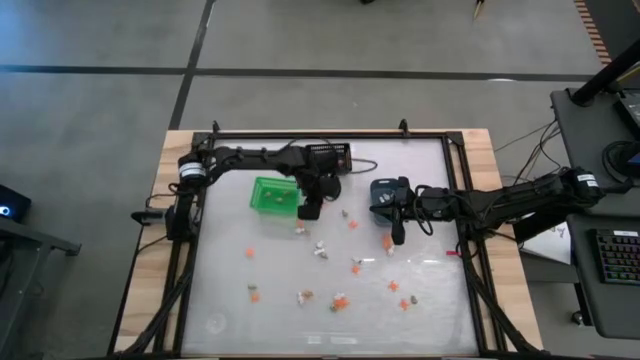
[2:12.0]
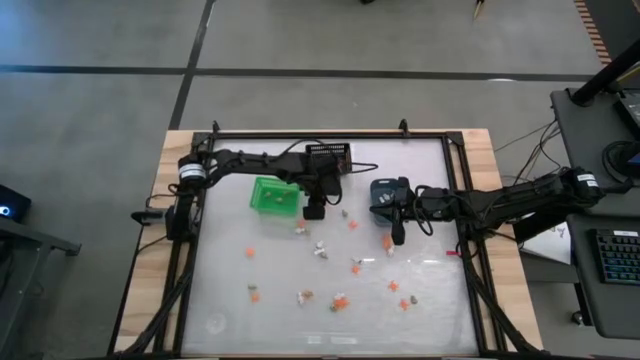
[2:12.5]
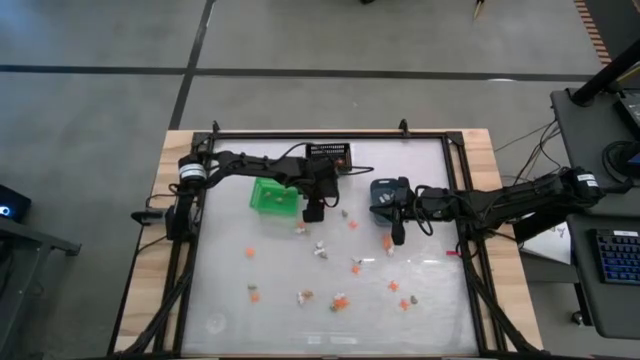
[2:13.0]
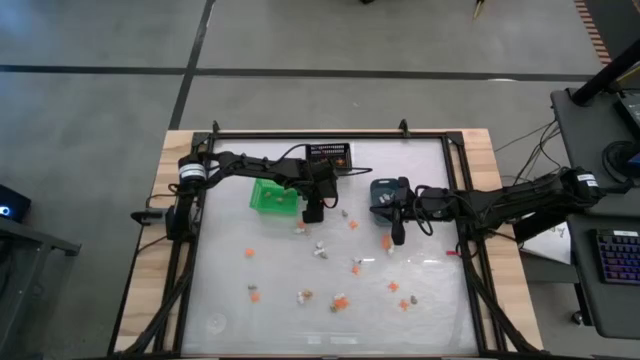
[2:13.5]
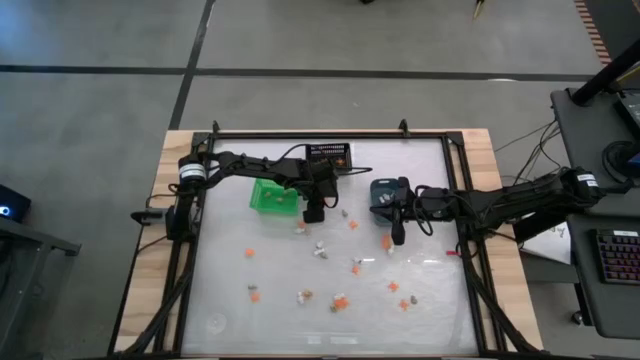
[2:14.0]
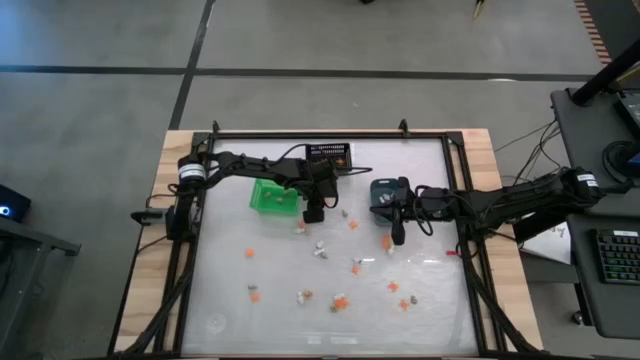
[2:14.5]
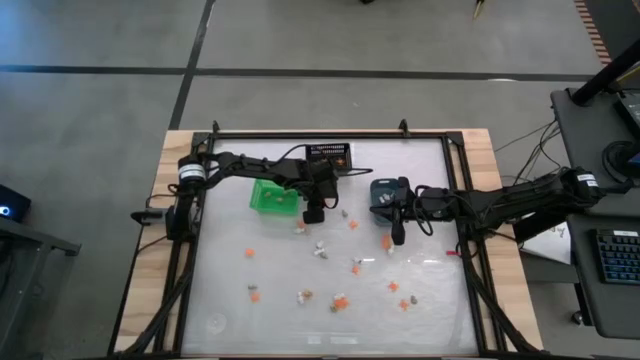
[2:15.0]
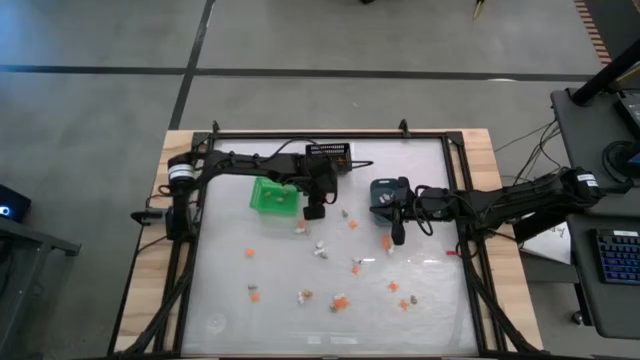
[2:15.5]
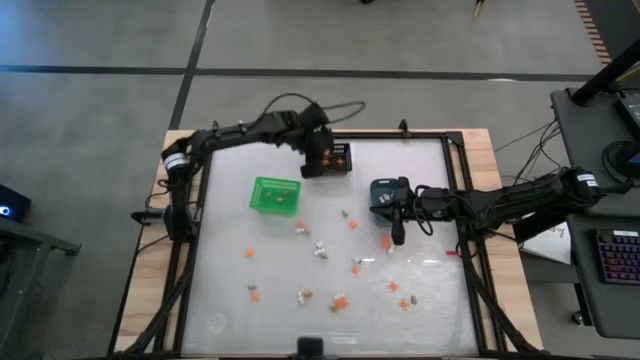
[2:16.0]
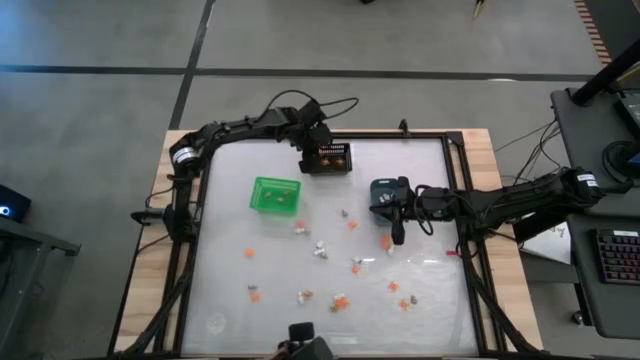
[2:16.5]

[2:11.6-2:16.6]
Task: Sort Halloween decoration
Put the orange spider toy into the black bin

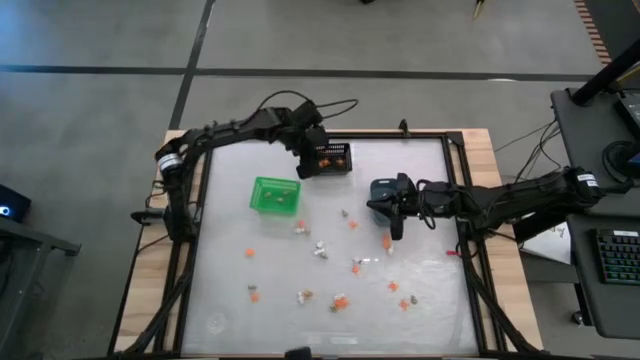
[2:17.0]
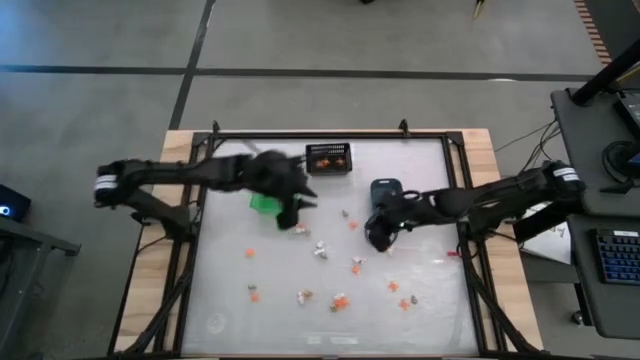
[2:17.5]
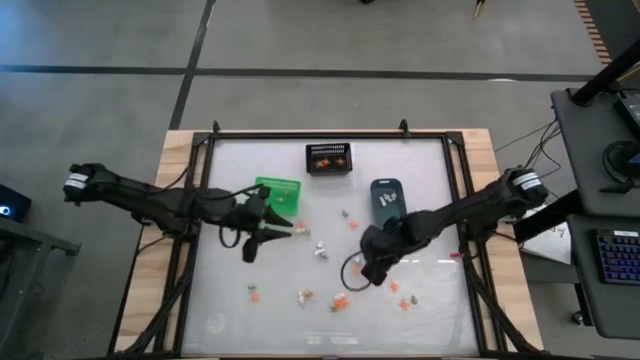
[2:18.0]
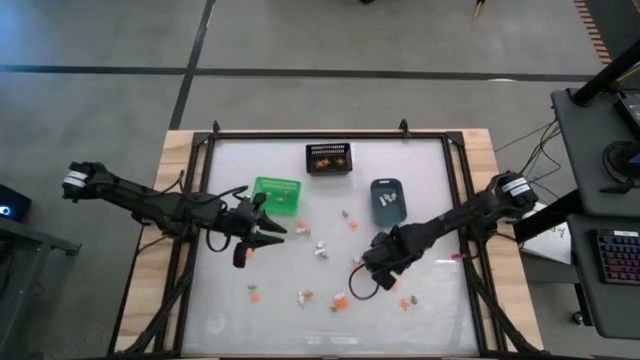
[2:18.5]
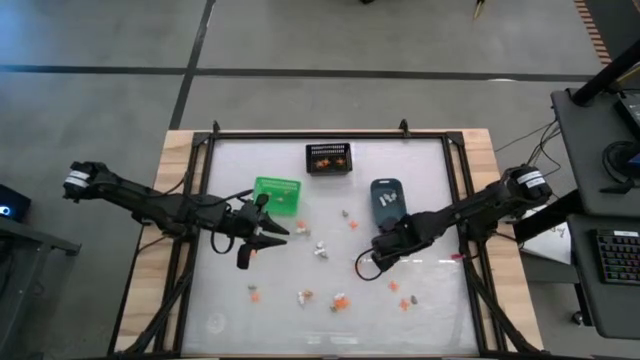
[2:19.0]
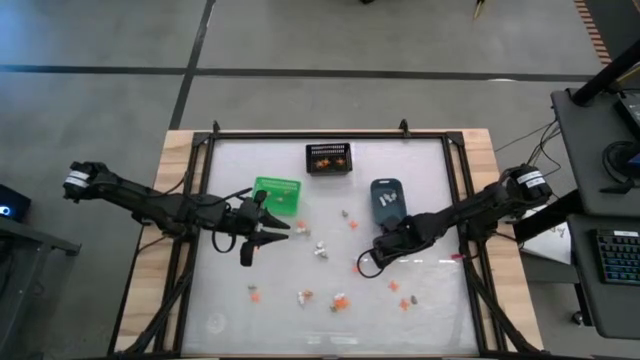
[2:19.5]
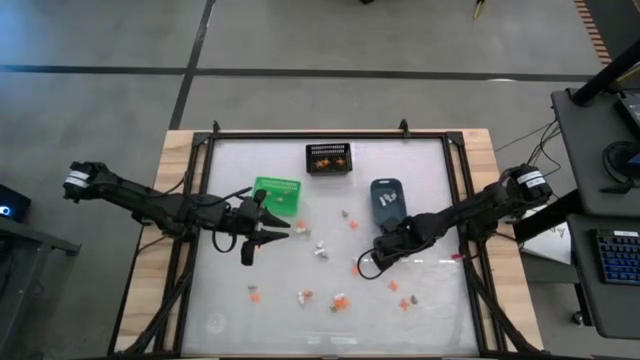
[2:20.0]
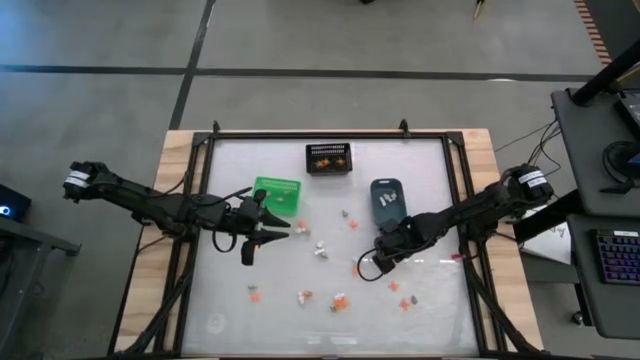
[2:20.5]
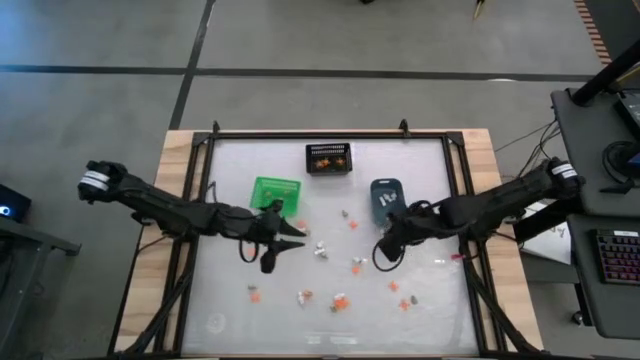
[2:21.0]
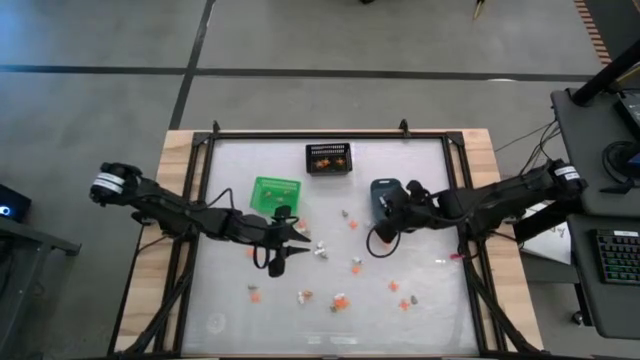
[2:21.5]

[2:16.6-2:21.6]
Put the white skeleton toy into the blue bin

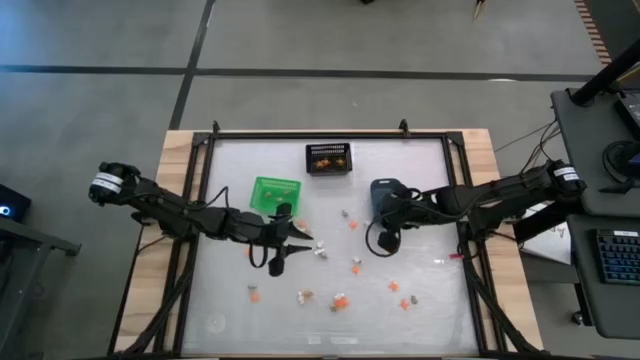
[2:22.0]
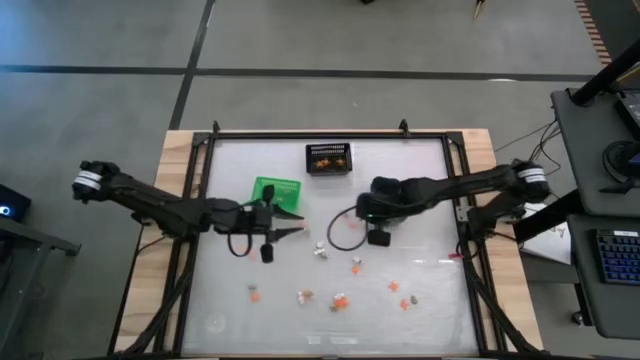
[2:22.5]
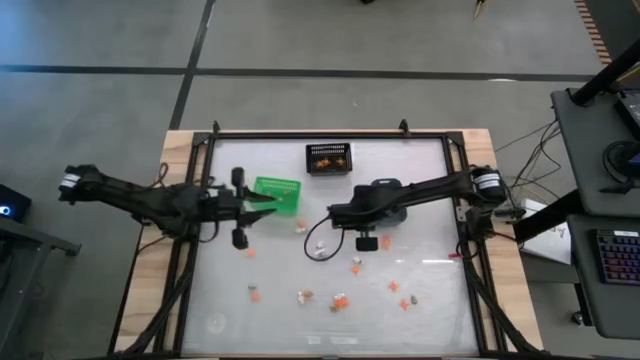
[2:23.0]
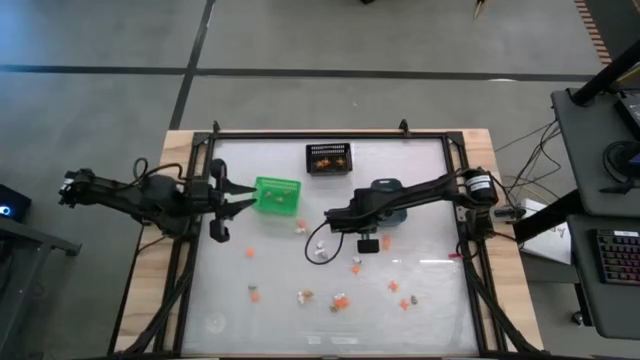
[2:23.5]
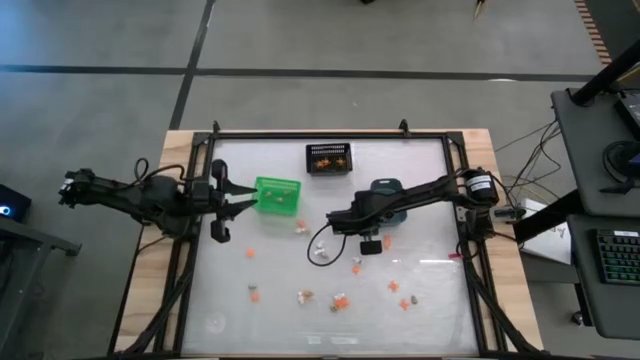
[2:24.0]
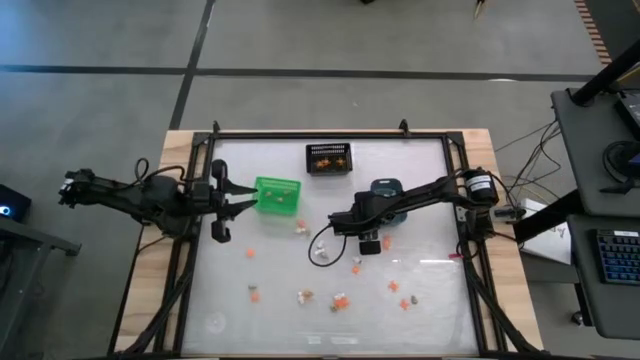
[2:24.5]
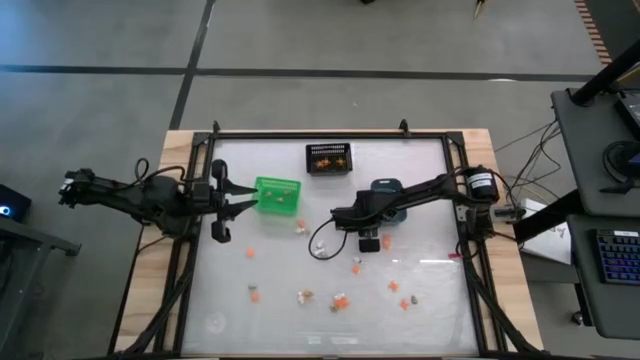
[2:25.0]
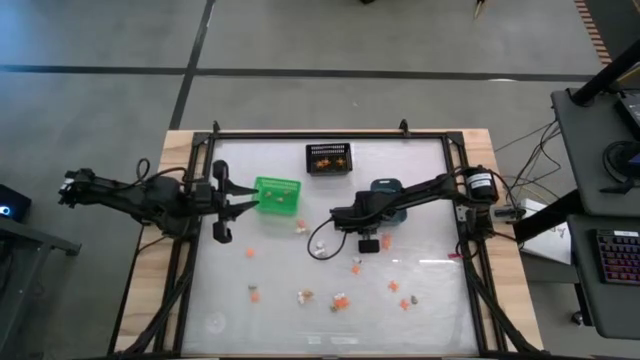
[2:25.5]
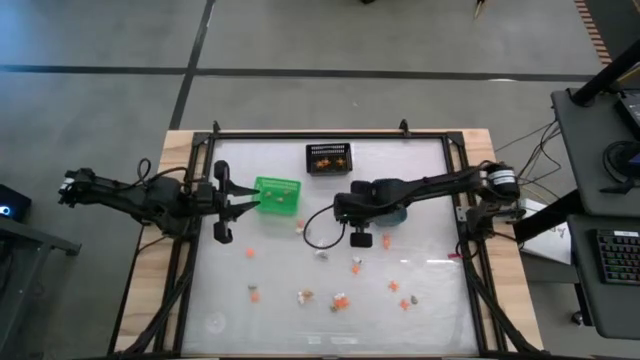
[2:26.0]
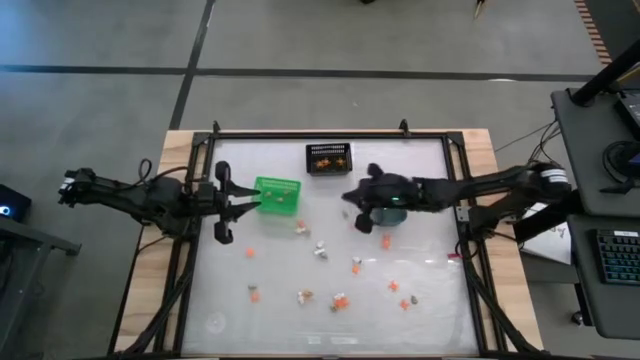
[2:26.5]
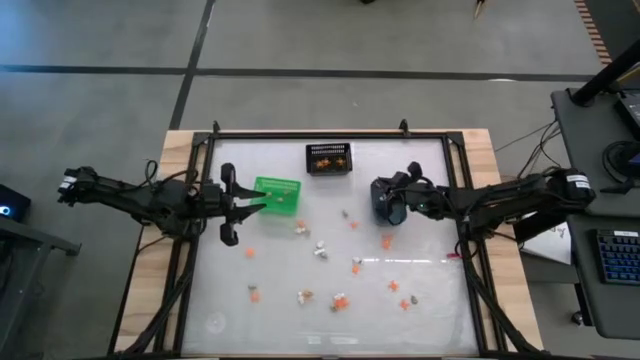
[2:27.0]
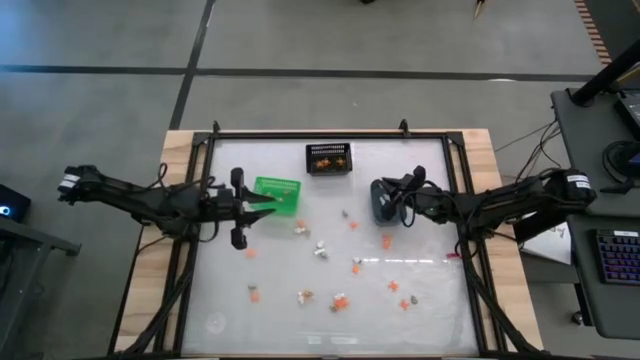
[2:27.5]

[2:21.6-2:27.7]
Put the white skeleton toy into the blue bin

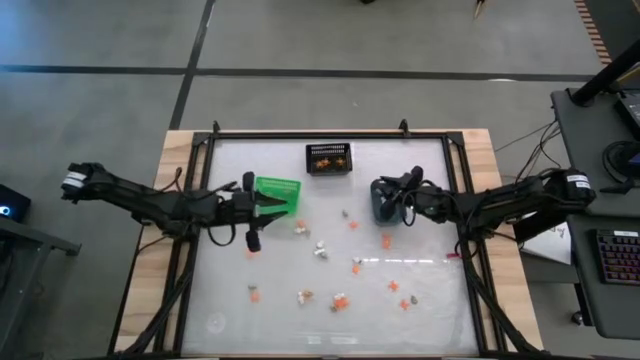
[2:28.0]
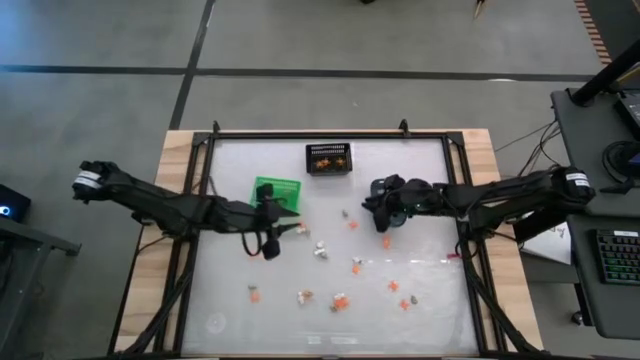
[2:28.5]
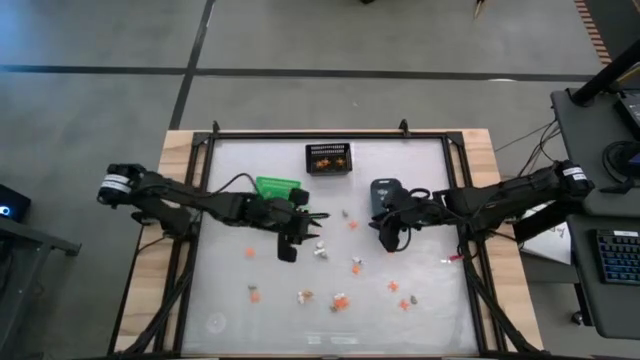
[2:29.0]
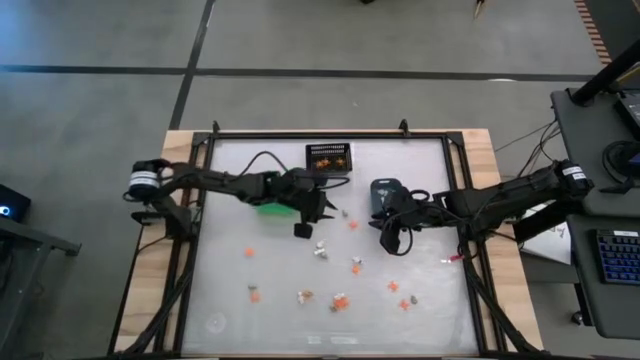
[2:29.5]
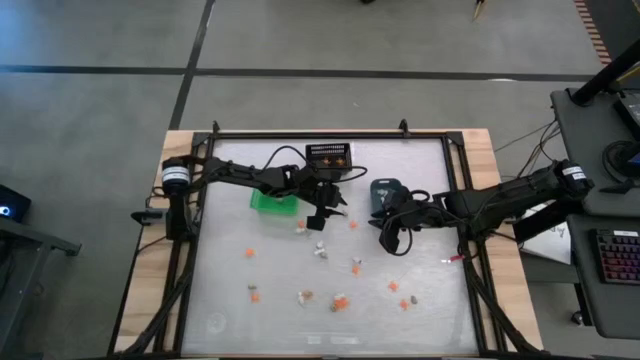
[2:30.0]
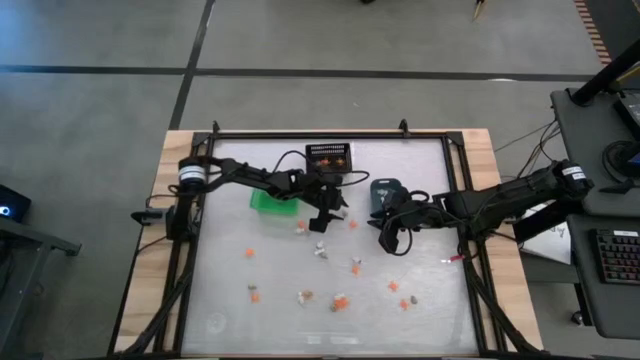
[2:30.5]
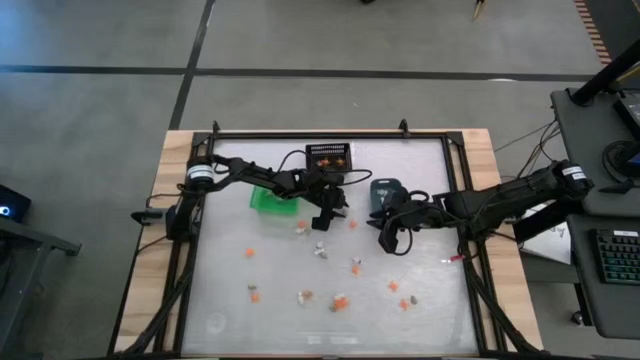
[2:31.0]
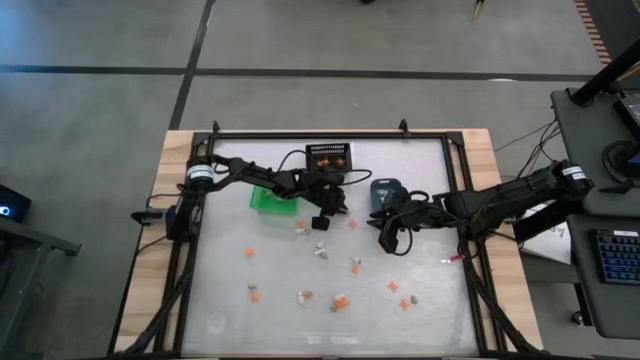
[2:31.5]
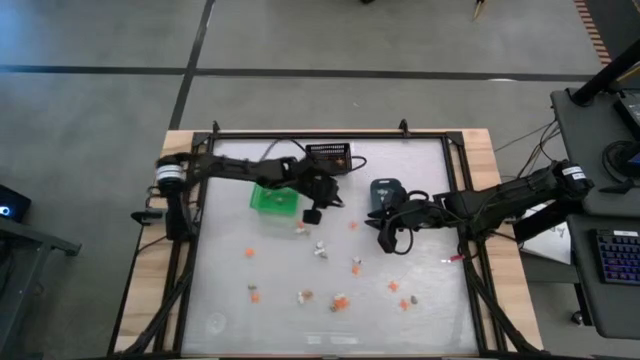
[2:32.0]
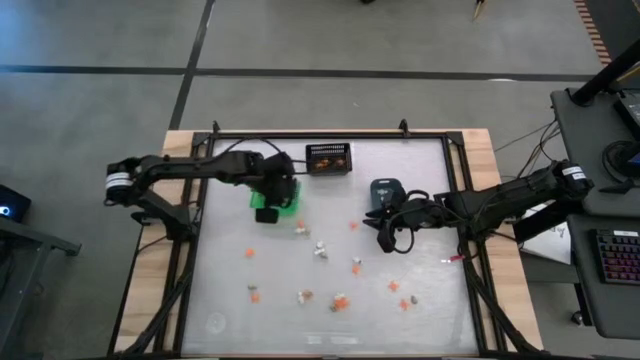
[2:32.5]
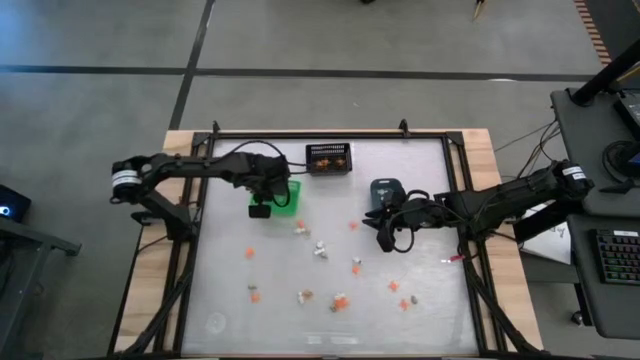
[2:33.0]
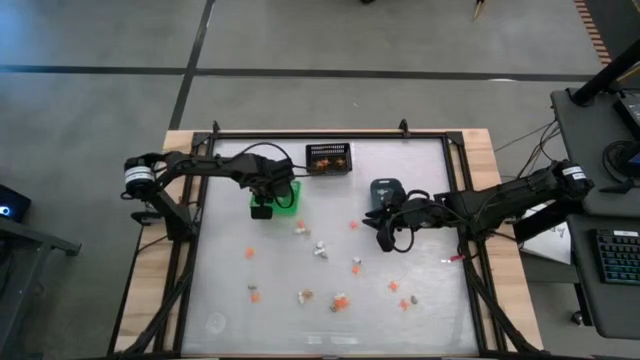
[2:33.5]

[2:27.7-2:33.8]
Put the gray skull toy into the green bin
